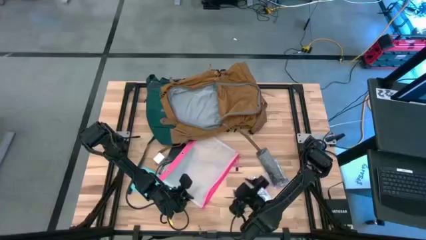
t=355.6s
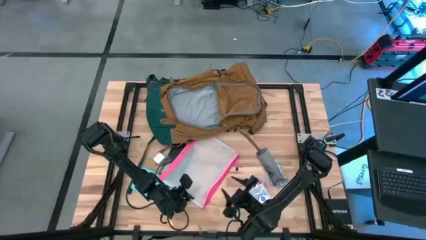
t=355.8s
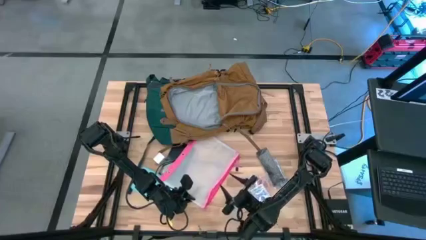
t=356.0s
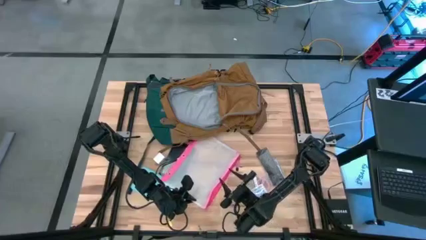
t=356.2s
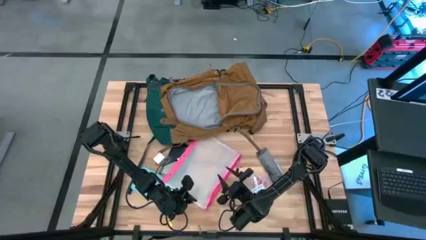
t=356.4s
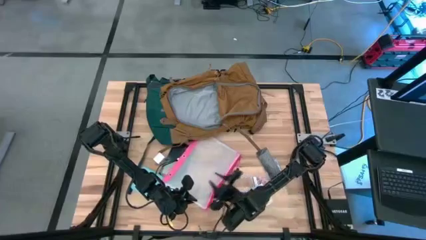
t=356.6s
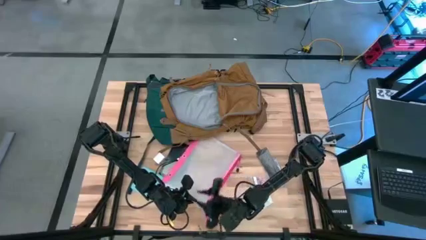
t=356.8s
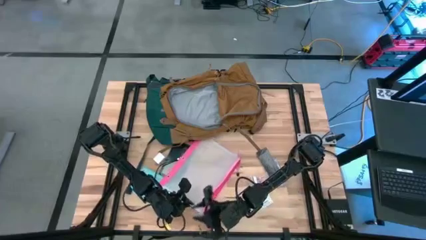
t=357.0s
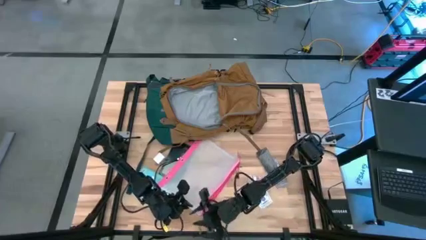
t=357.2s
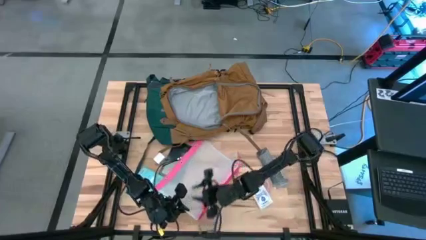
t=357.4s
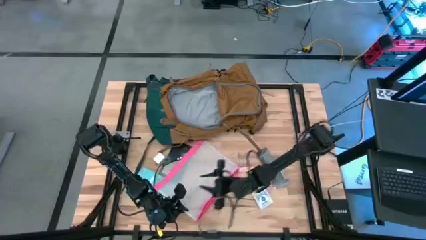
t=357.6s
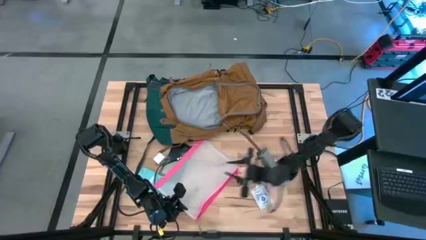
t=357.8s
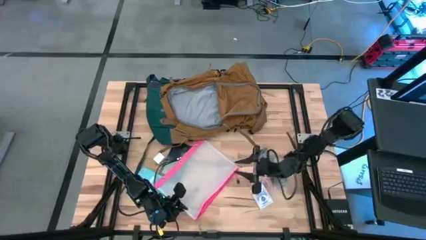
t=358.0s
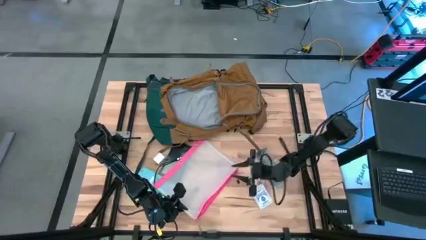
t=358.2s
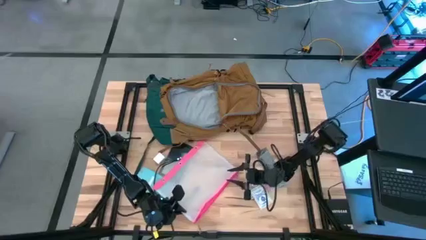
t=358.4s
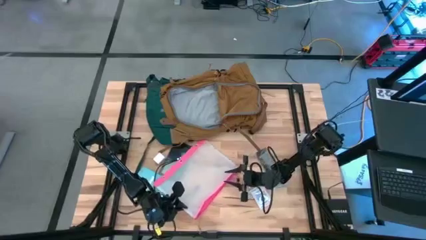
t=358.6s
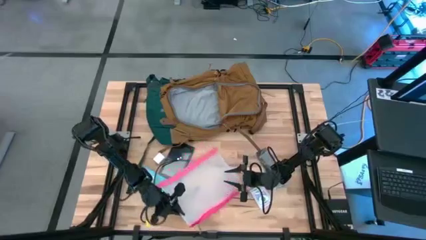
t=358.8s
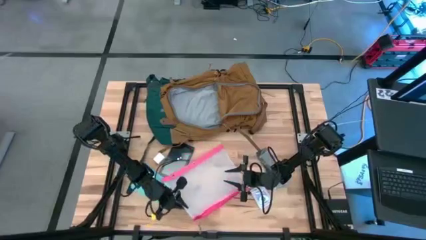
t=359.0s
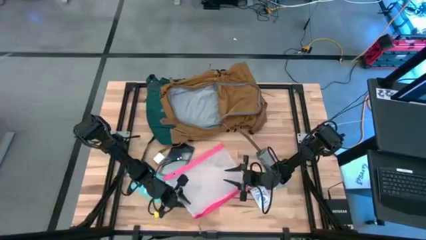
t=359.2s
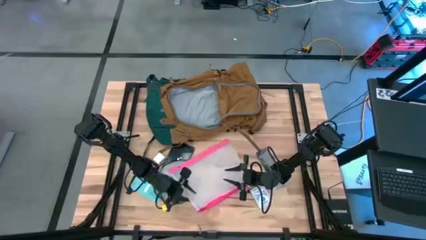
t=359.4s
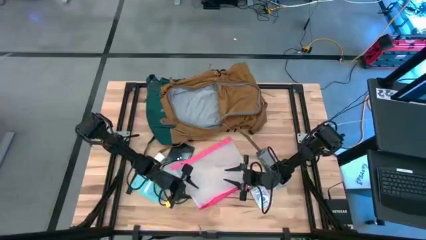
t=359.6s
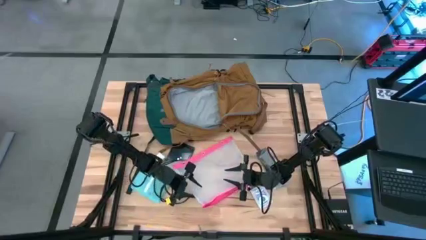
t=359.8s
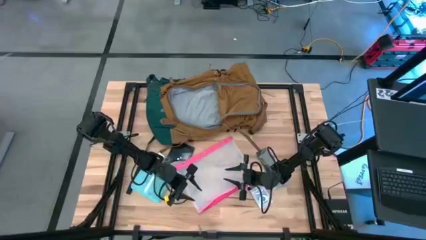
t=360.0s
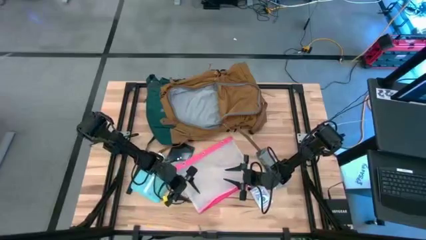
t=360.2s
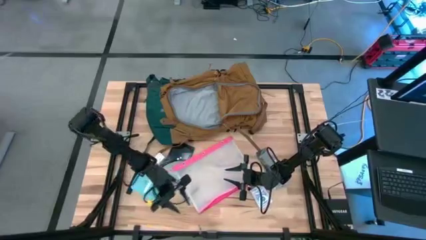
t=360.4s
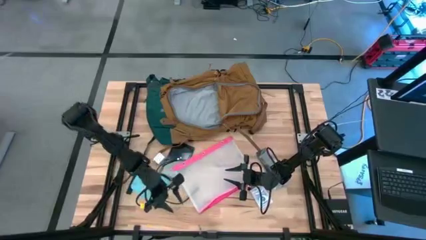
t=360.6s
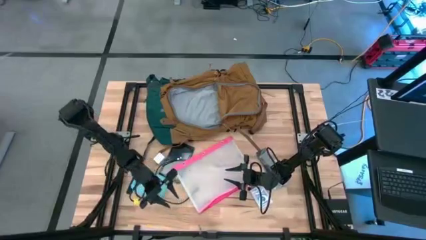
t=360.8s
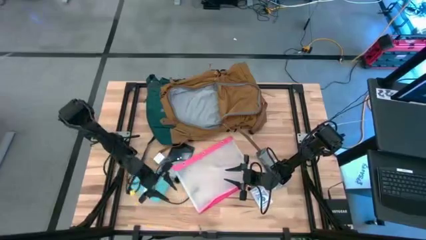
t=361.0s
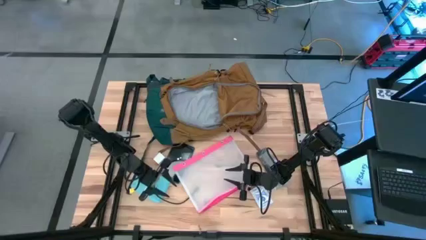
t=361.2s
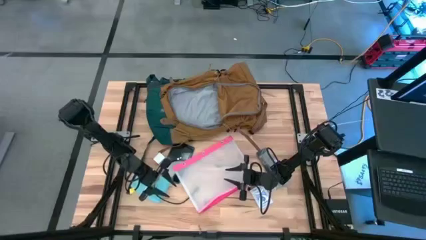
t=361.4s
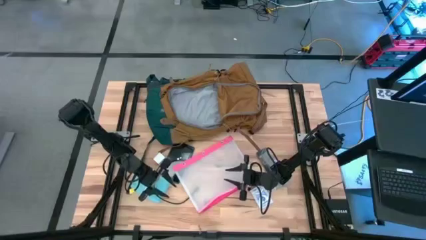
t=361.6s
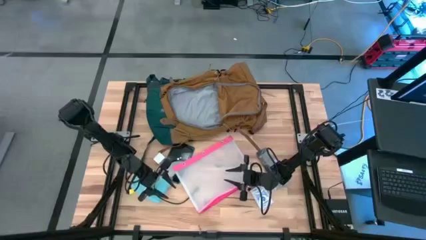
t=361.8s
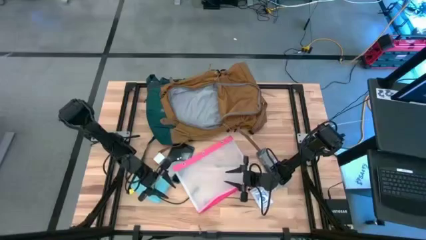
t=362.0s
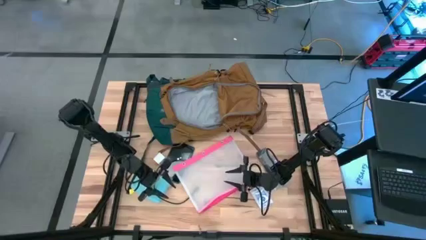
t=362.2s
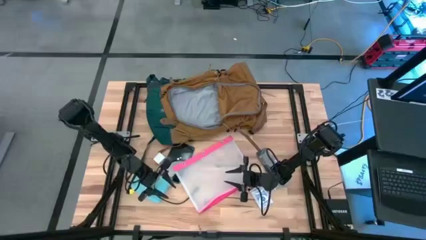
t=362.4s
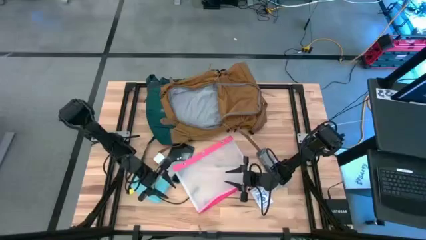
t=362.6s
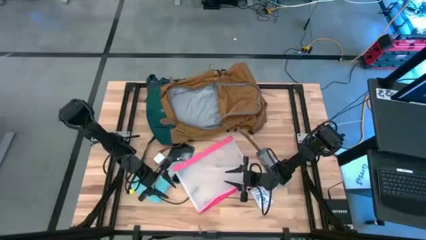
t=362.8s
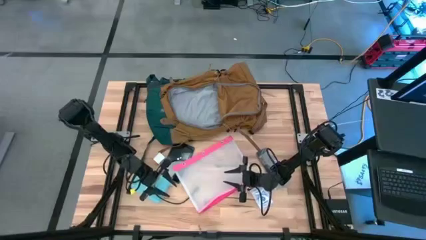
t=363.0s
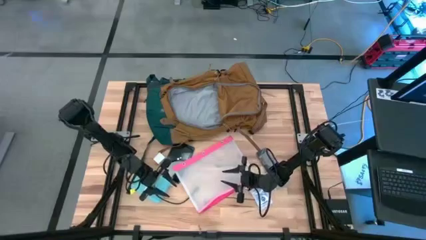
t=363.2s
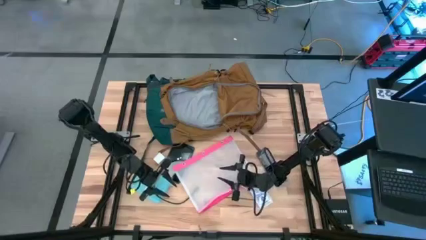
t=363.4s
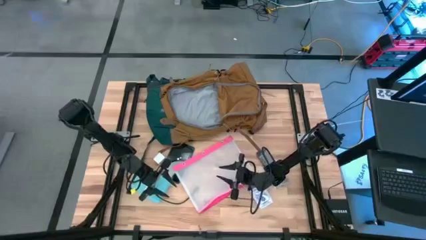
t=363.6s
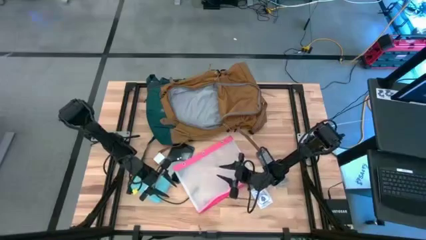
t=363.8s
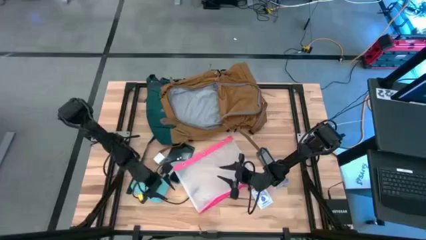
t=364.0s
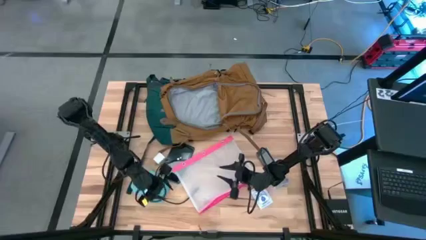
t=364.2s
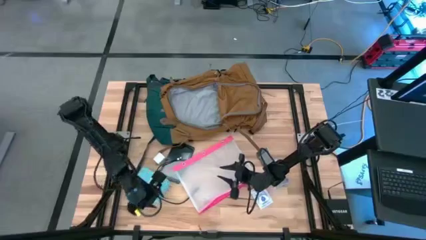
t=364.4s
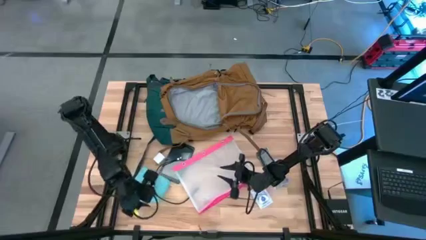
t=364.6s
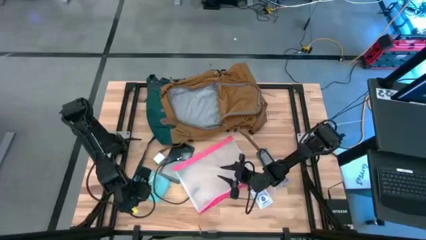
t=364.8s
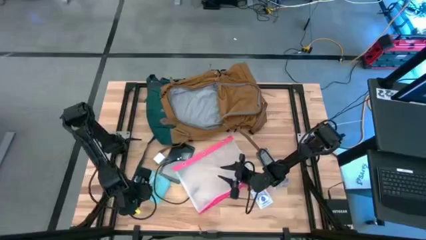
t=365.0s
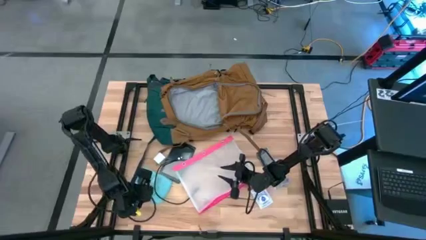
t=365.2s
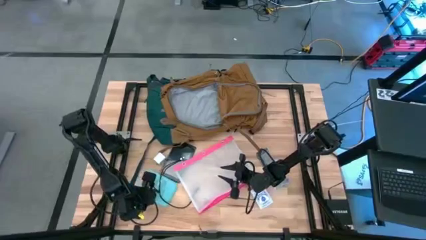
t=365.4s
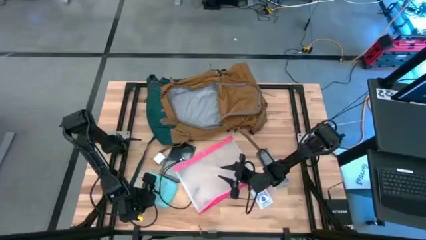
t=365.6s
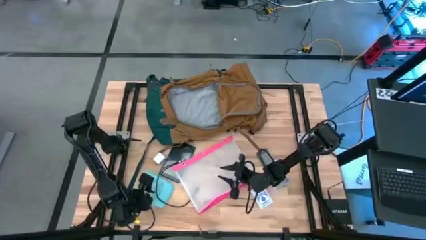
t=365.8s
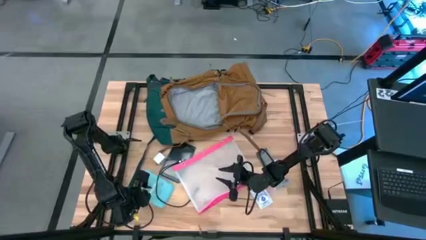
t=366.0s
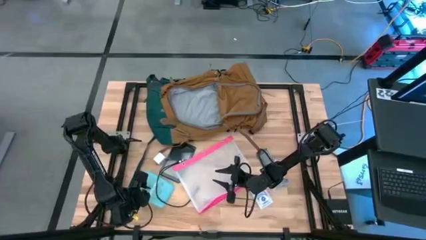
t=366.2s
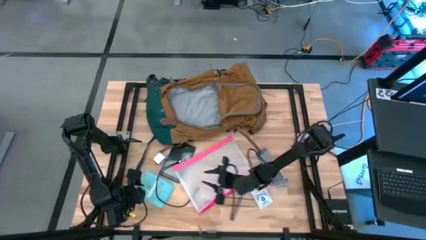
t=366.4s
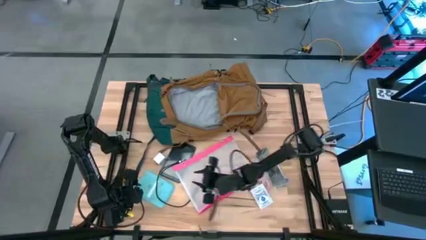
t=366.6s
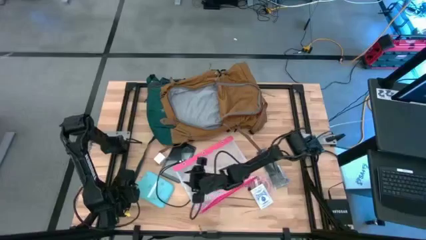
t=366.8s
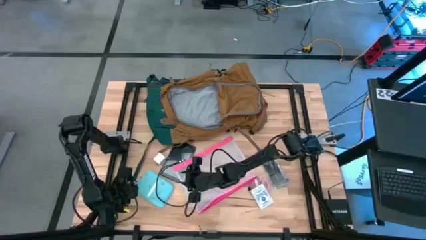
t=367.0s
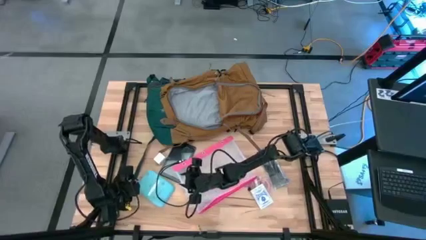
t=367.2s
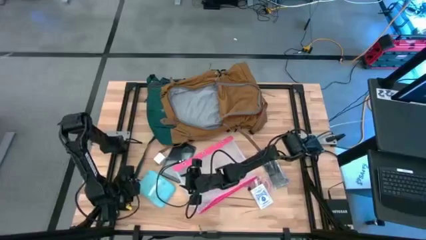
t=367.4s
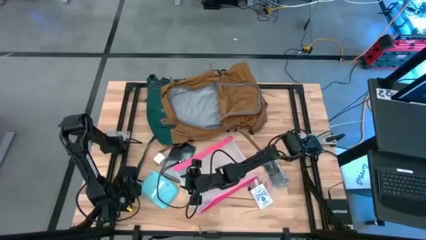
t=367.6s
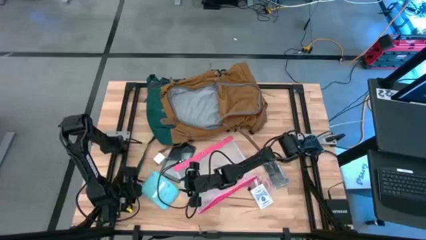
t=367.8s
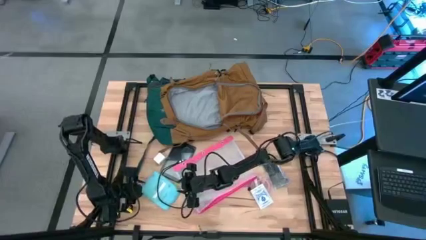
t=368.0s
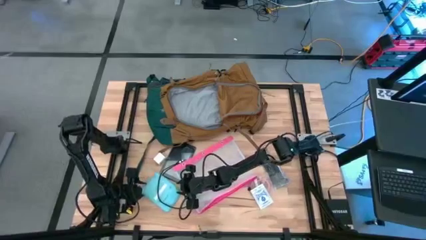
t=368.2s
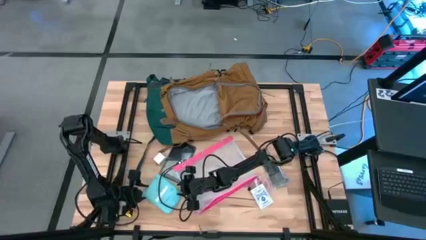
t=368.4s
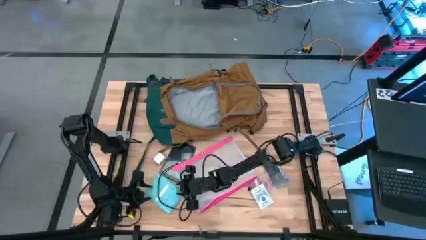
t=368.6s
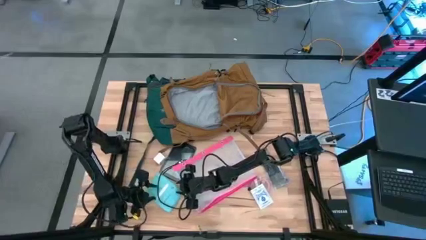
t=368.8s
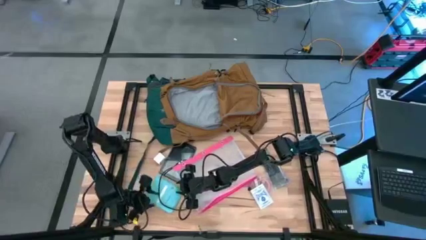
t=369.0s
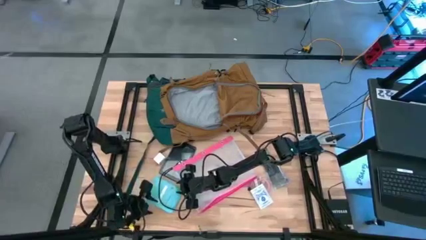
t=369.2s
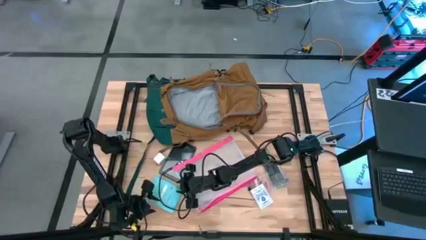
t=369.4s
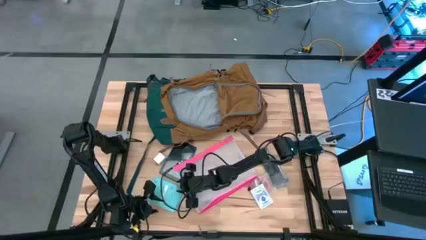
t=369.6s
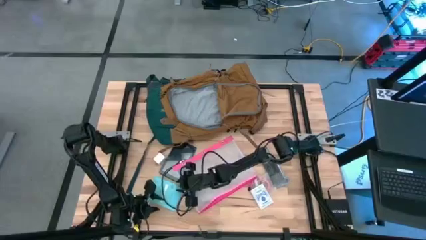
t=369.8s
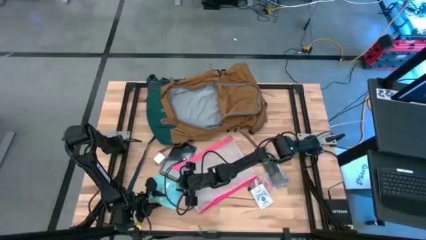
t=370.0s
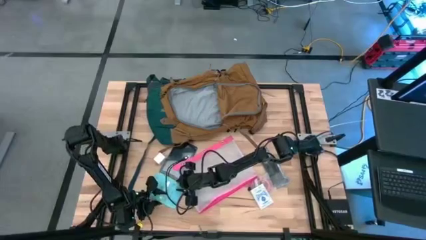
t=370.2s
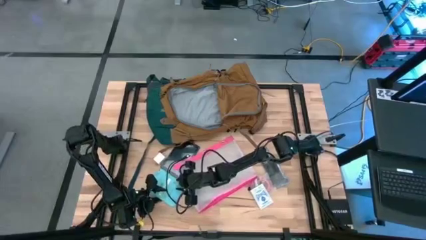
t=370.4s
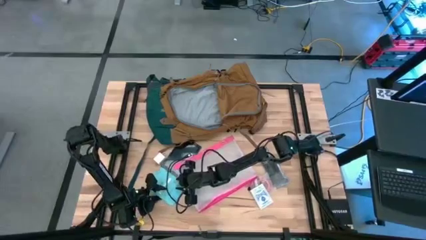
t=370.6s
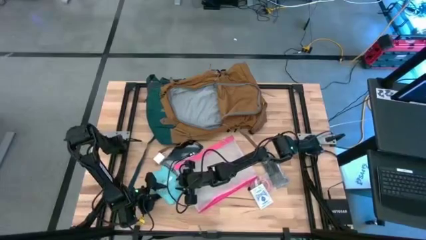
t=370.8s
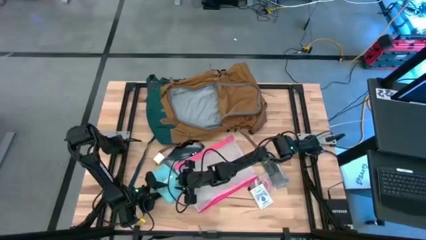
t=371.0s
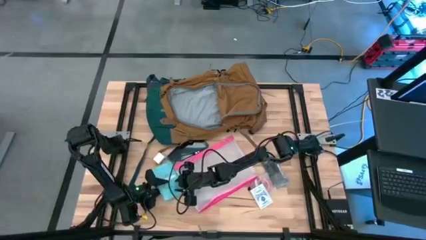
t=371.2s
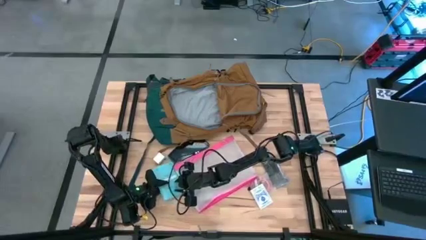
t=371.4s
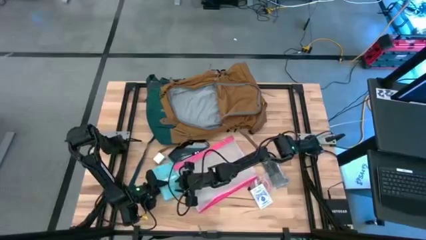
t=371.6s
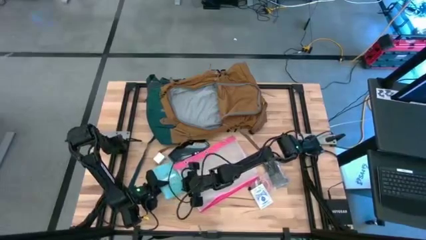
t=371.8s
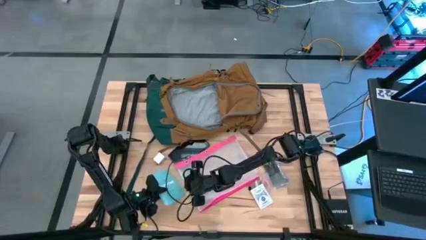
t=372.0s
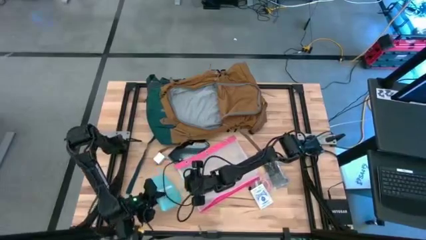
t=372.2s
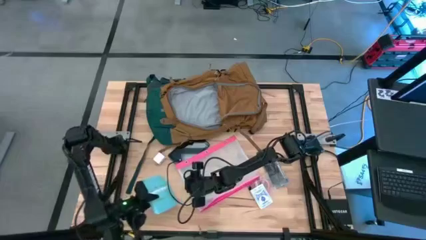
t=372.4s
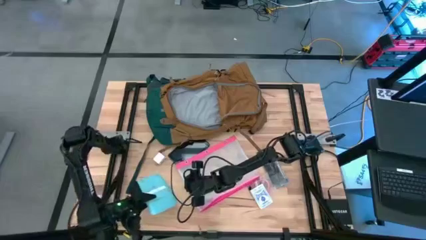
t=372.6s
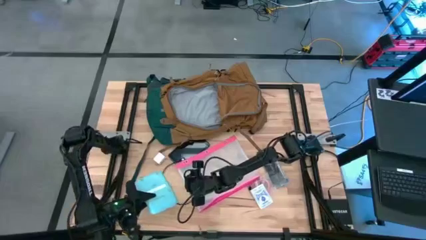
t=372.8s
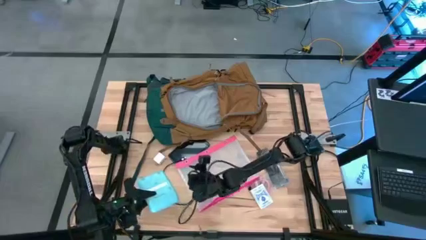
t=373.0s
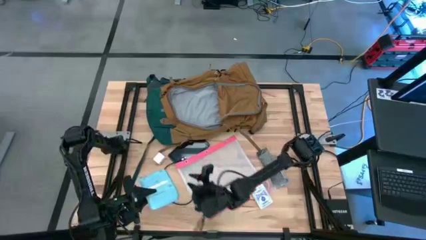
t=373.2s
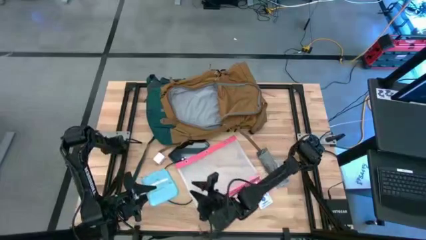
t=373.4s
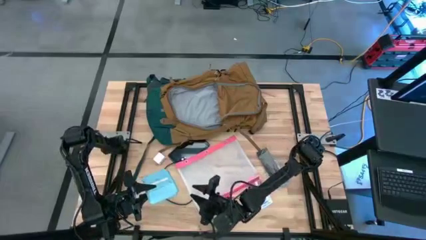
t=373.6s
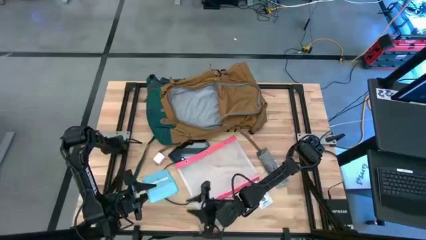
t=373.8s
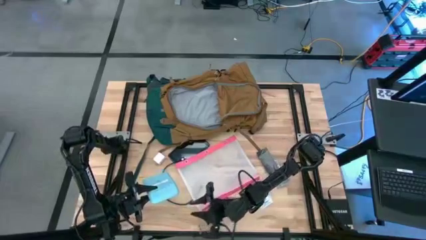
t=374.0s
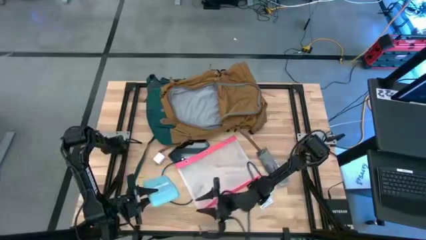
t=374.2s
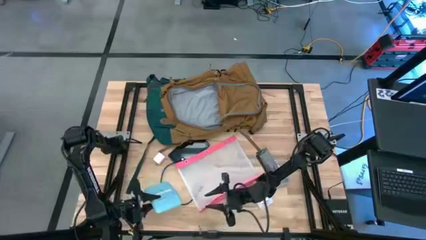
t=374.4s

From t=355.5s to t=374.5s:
Task: Unpack backpack
Put the blue calculator into the pink zipper pouch
